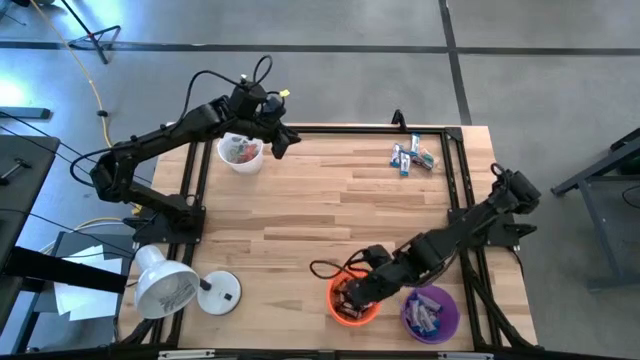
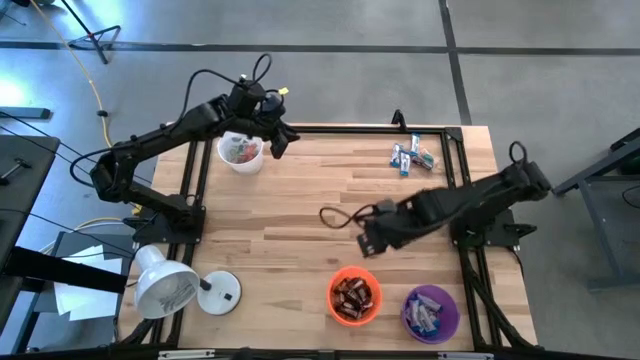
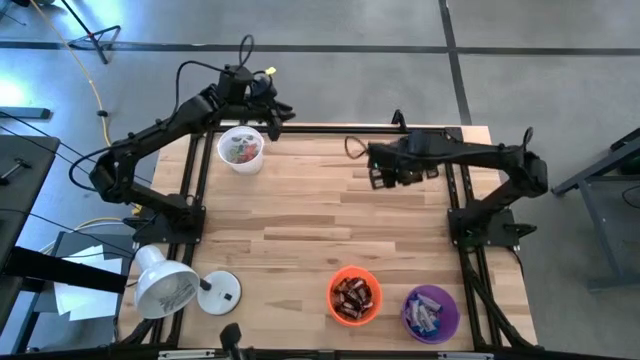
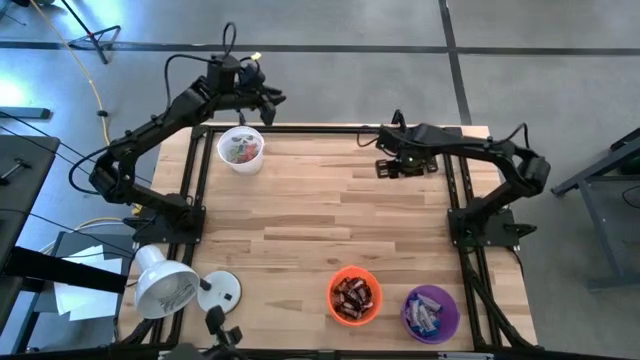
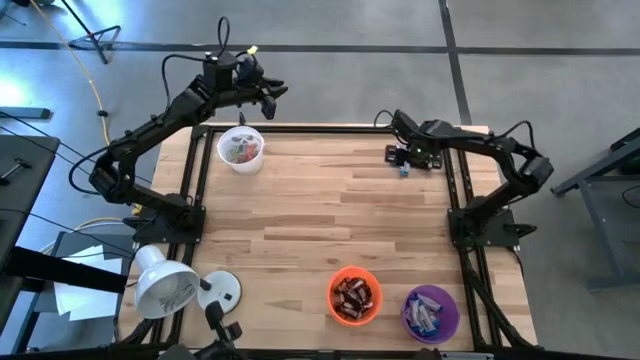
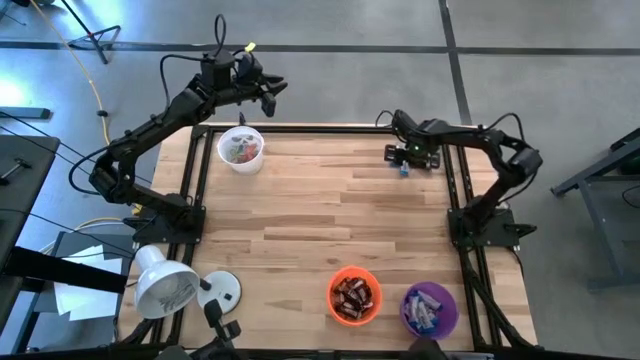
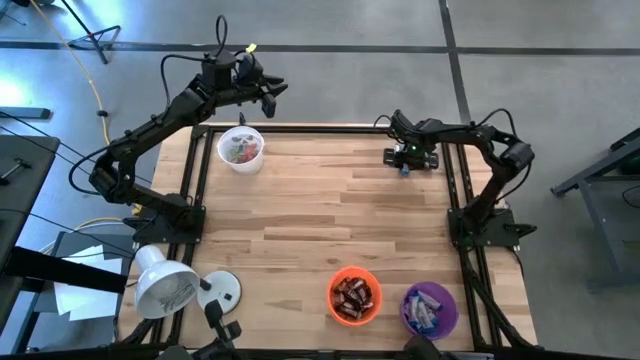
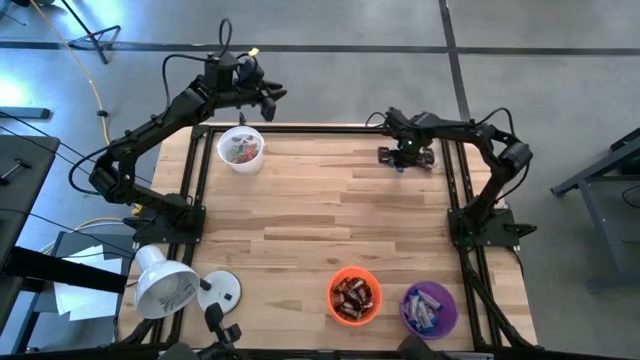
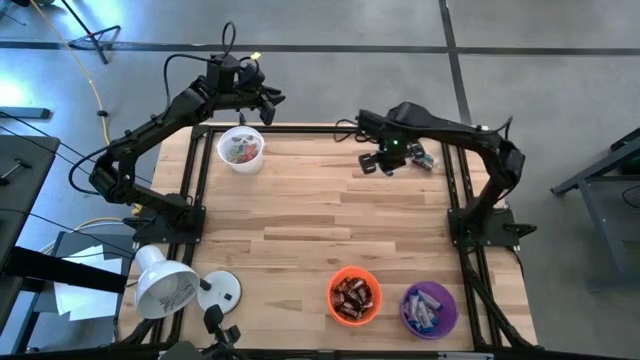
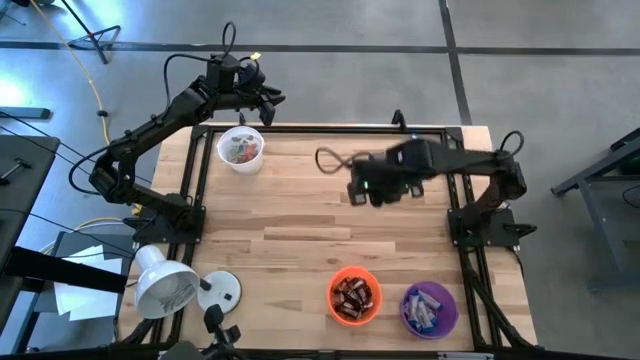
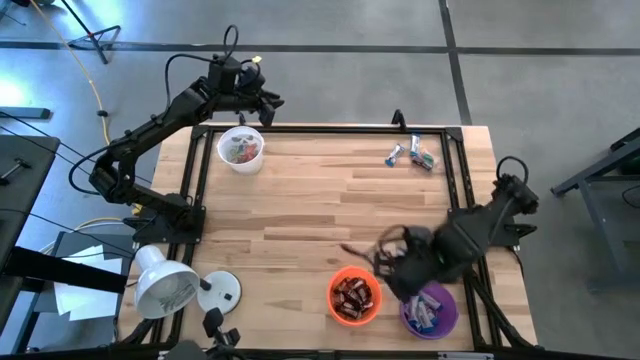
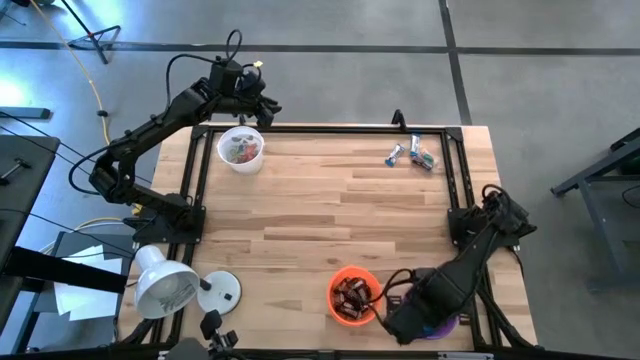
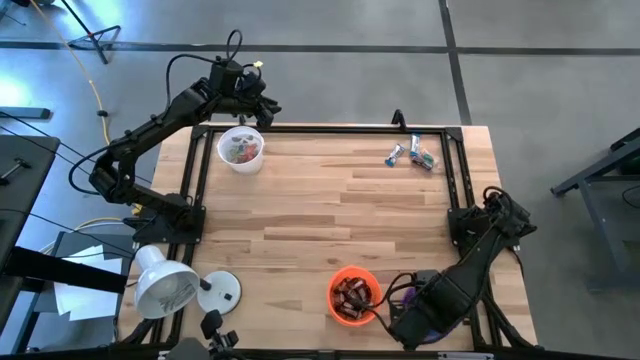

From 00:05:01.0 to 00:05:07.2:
Task: Organize candy in baskets
Put the white chocolate into the purple bucket

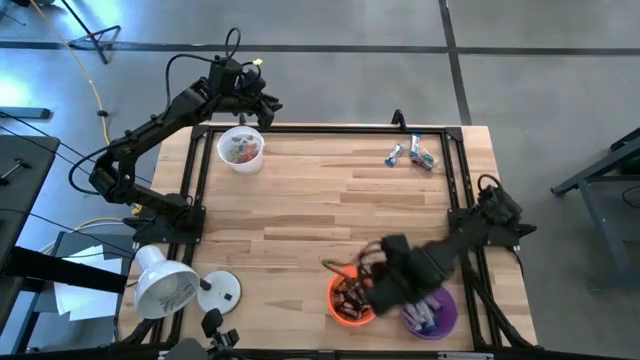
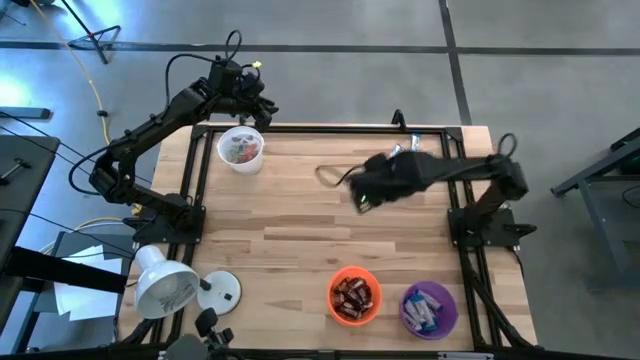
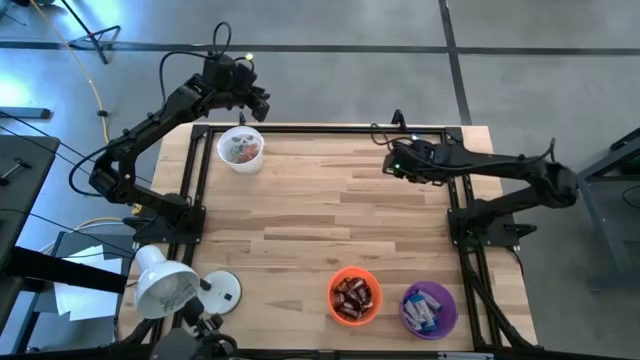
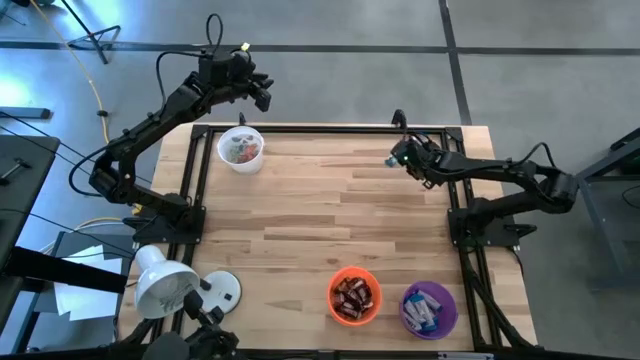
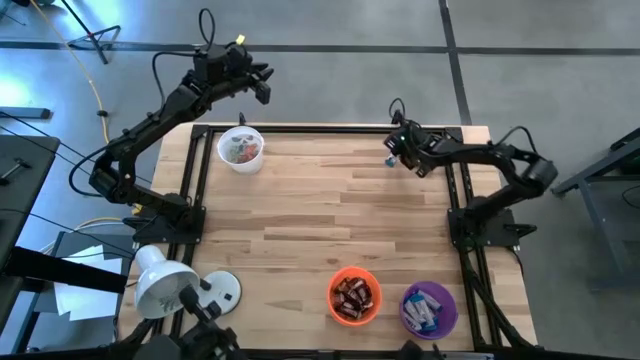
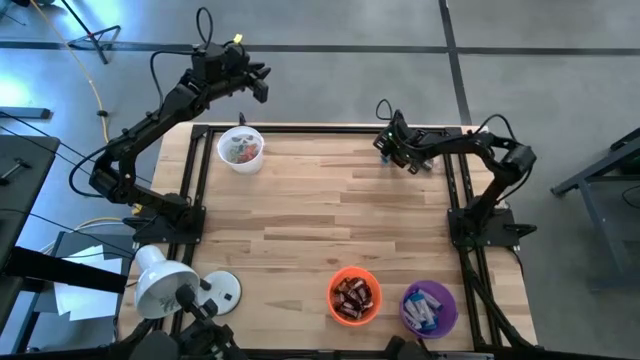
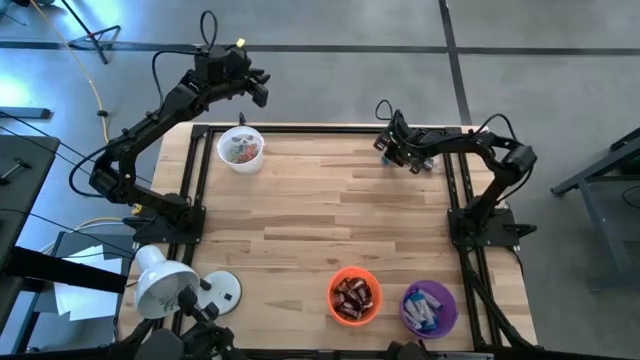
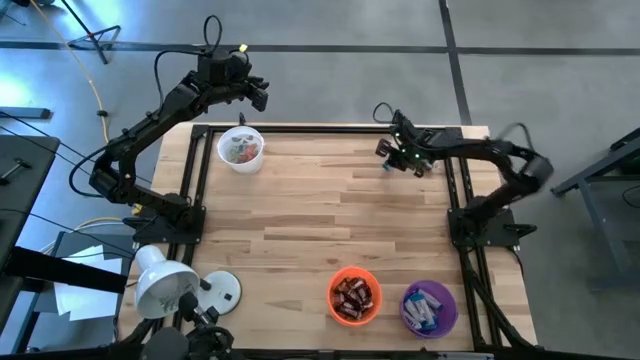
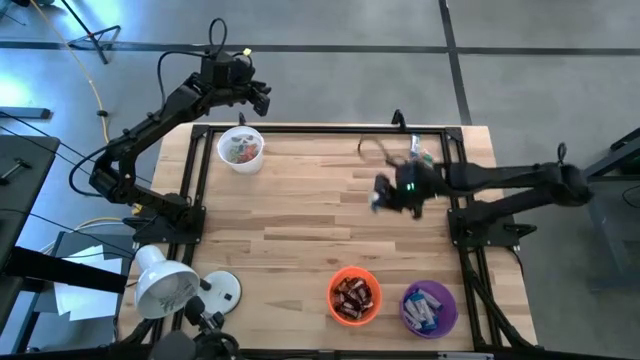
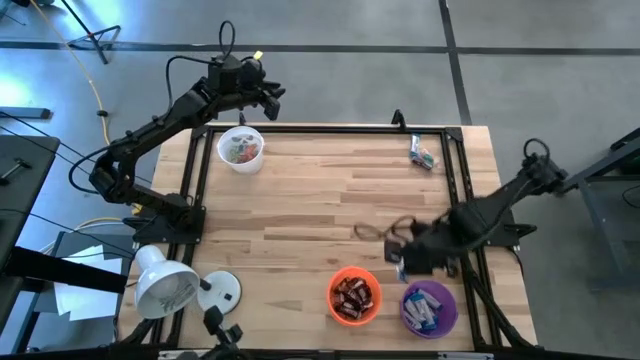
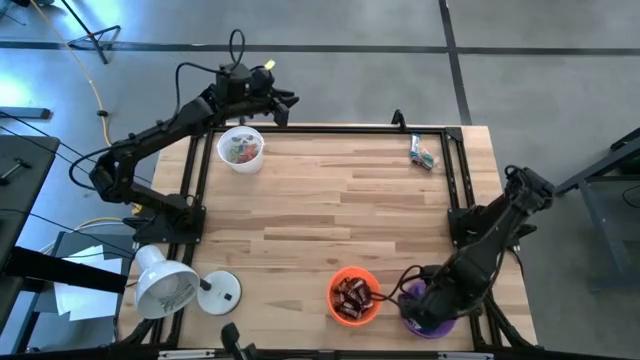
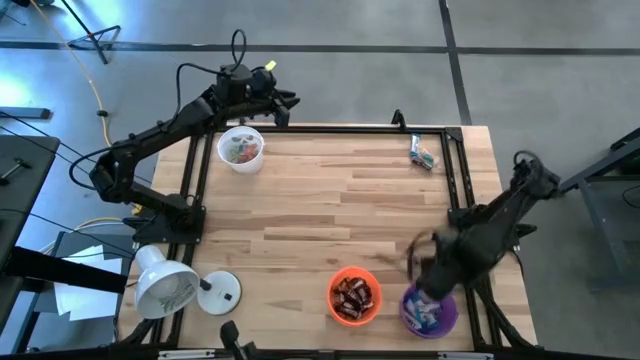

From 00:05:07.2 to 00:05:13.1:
Put the white chocolate into the purple bucket

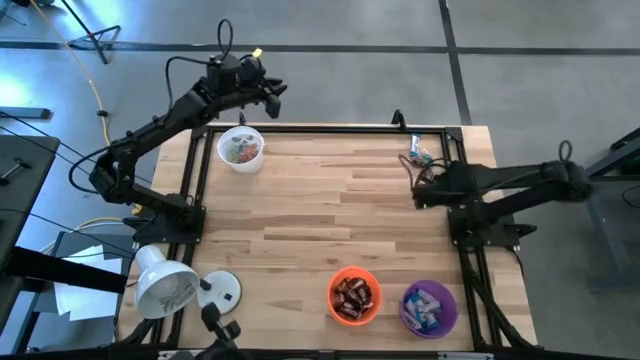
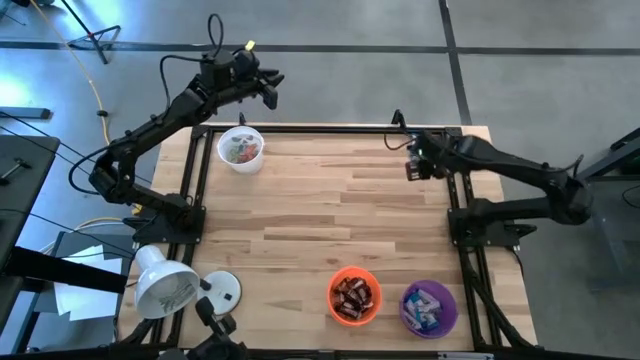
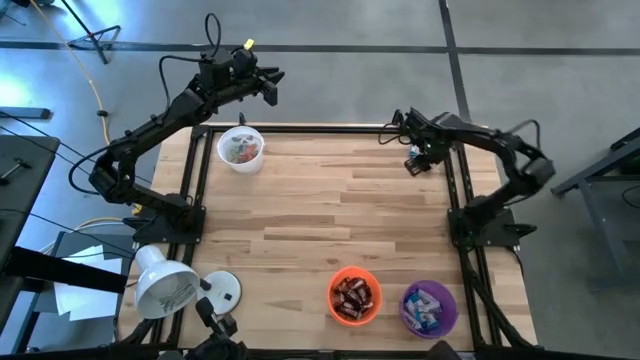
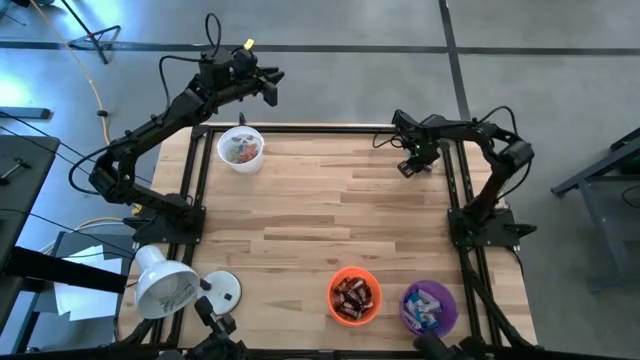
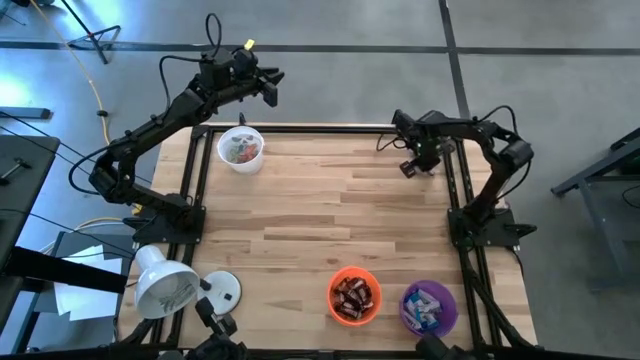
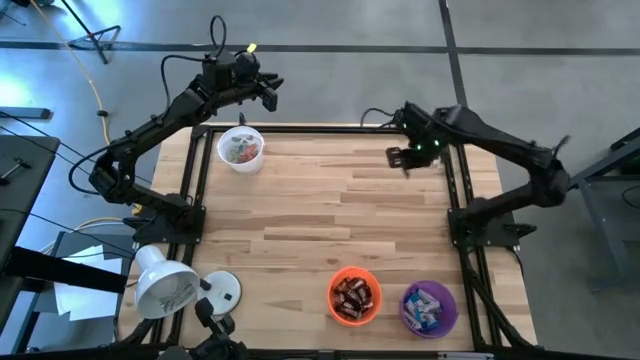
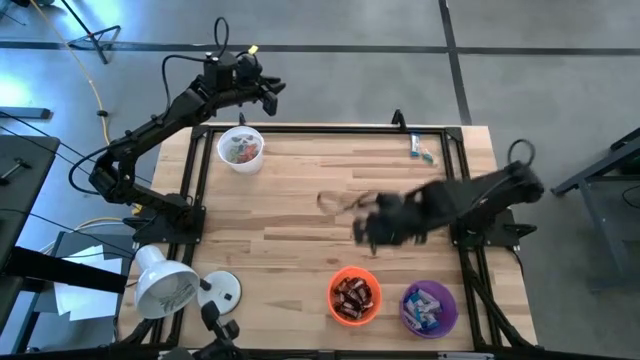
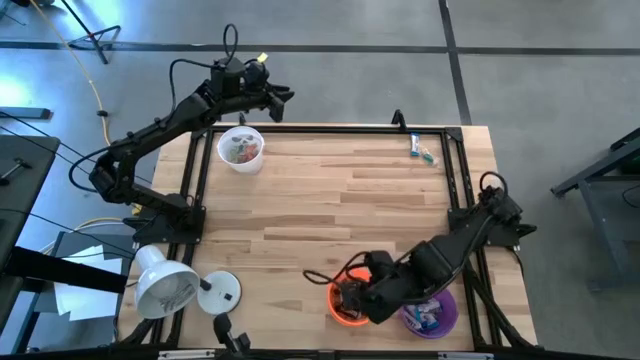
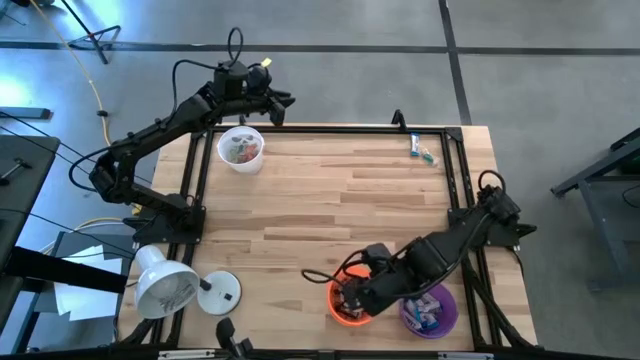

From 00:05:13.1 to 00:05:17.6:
Put the brown chocolate into the orange bucket

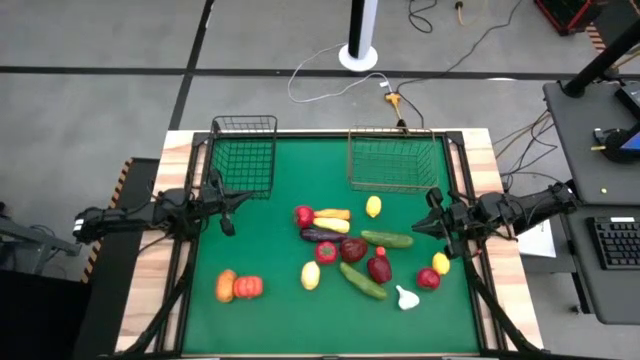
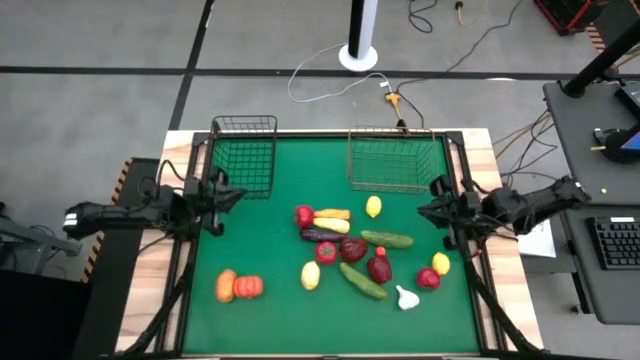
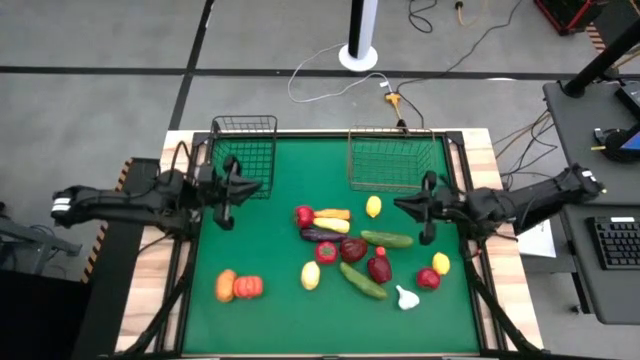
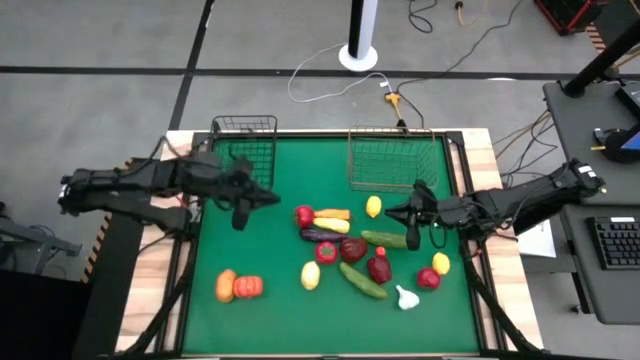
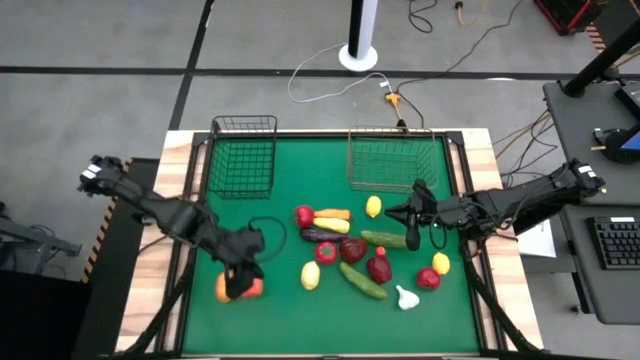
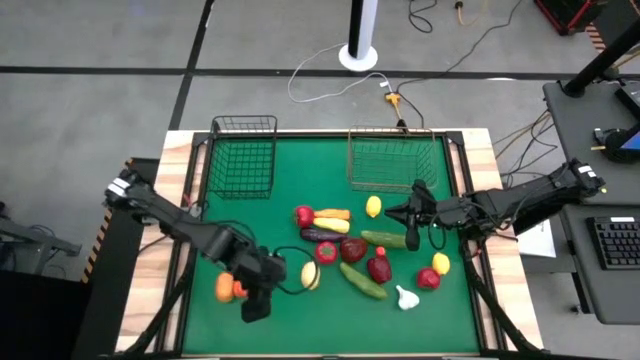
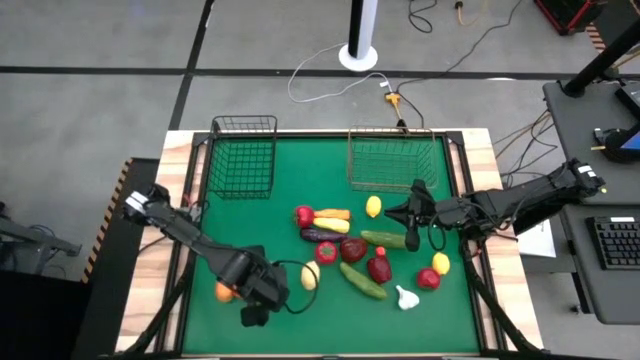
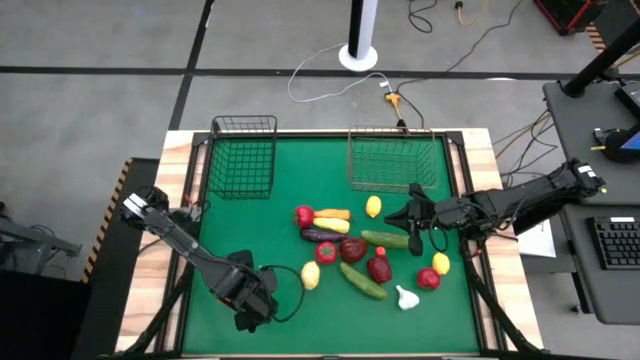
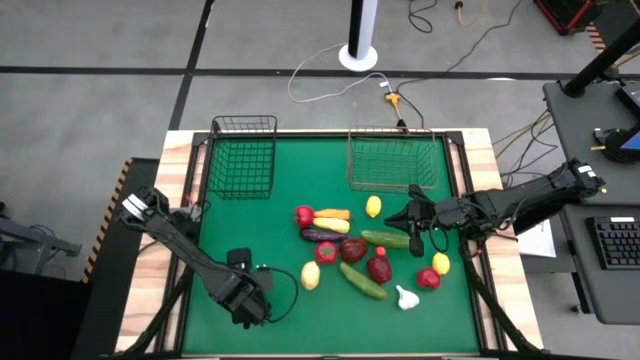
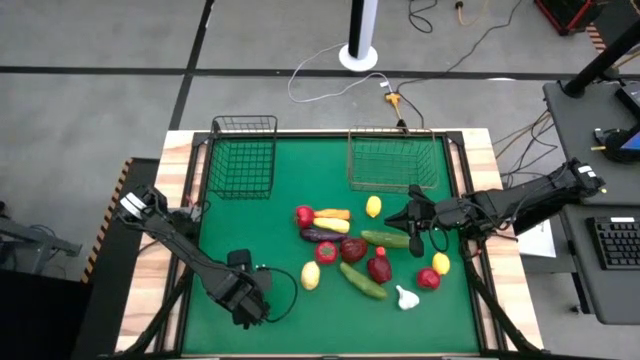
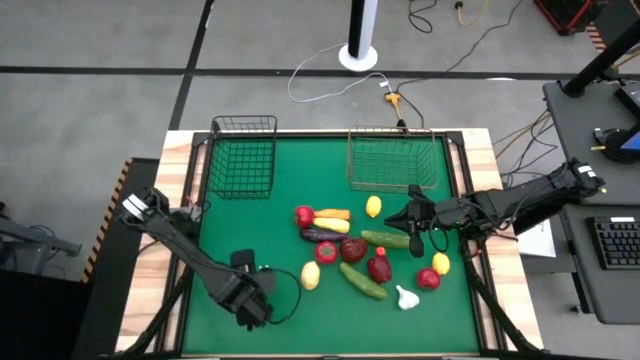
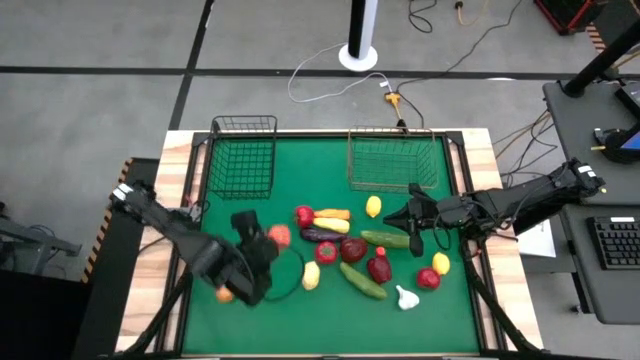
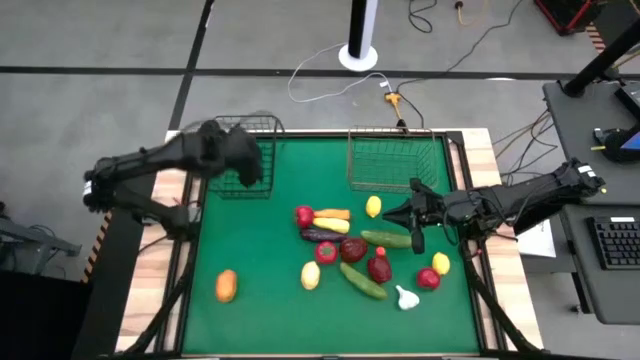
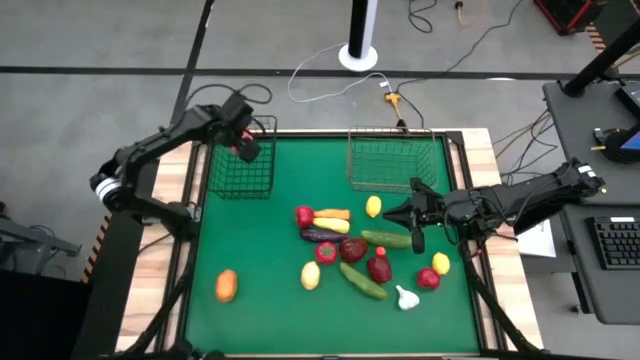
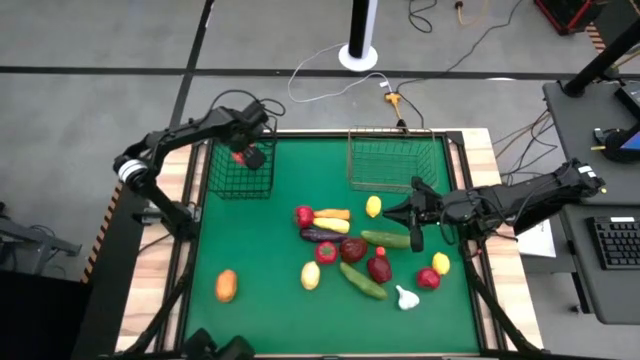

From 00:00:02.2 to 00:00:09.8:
Task: Sort produce into baskets
Put the orange pumpkin into the left wire basket
